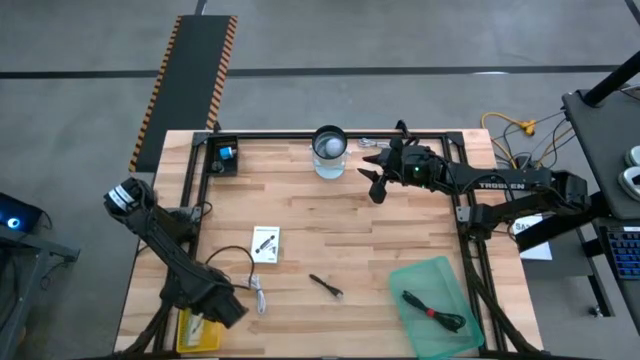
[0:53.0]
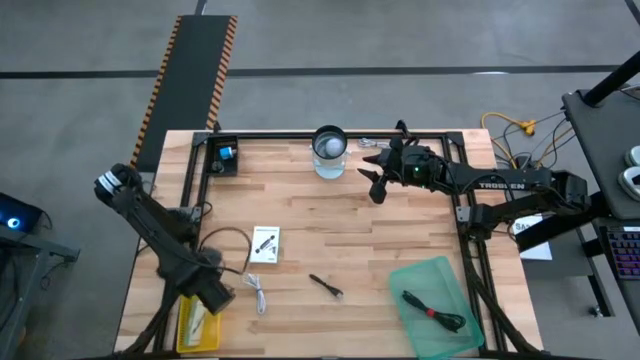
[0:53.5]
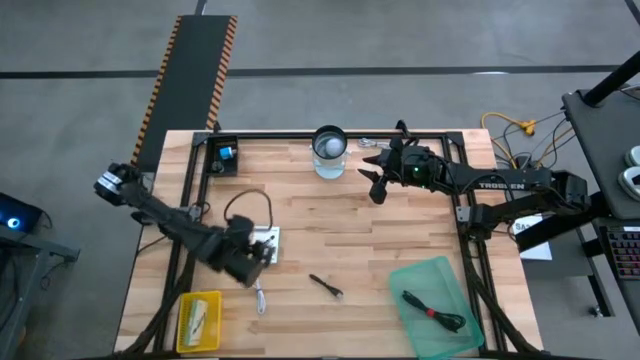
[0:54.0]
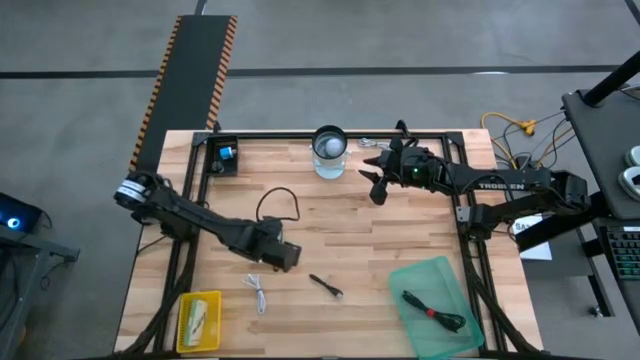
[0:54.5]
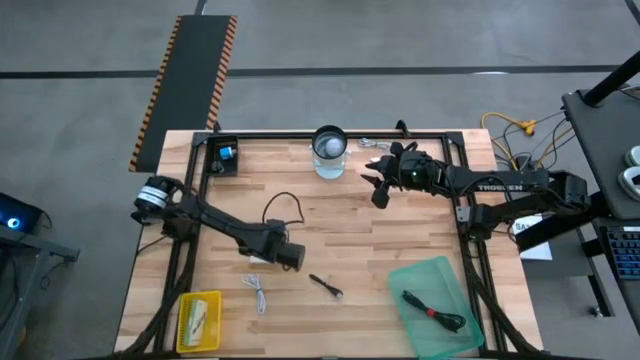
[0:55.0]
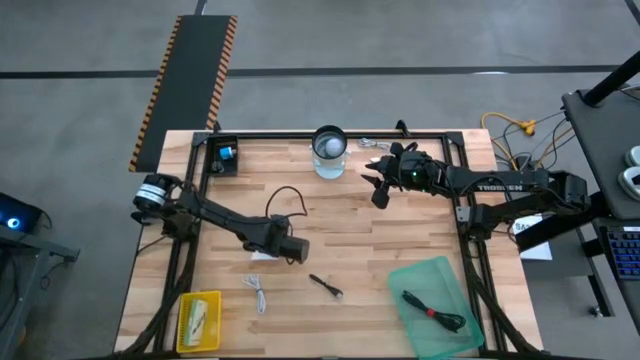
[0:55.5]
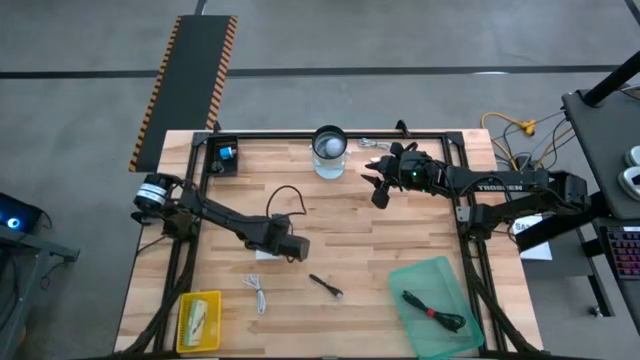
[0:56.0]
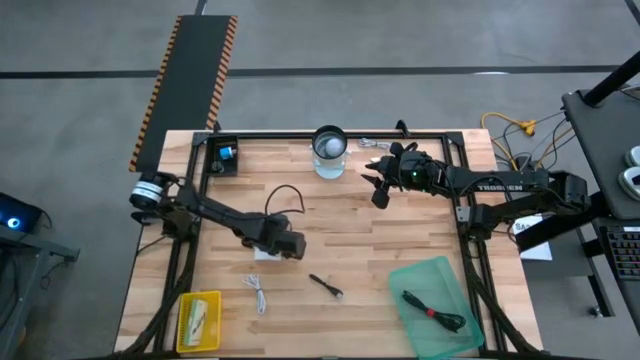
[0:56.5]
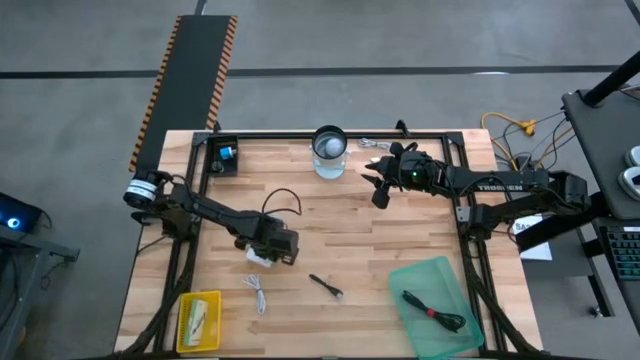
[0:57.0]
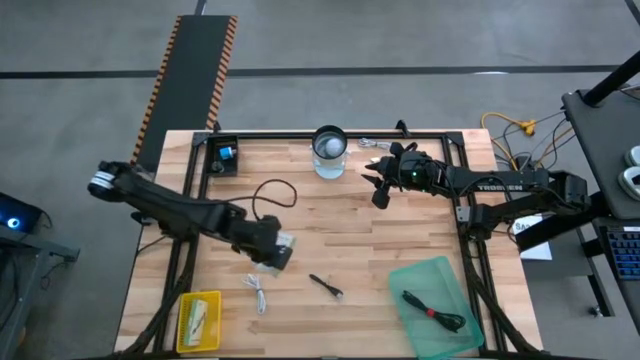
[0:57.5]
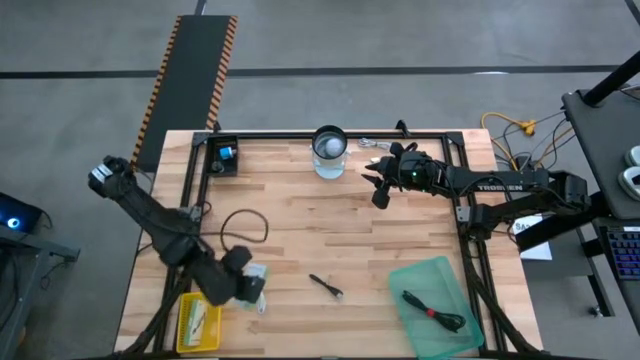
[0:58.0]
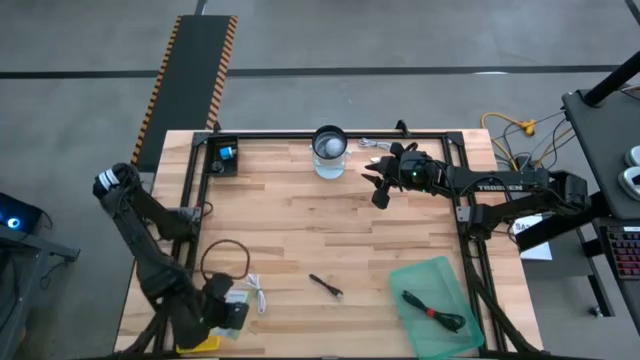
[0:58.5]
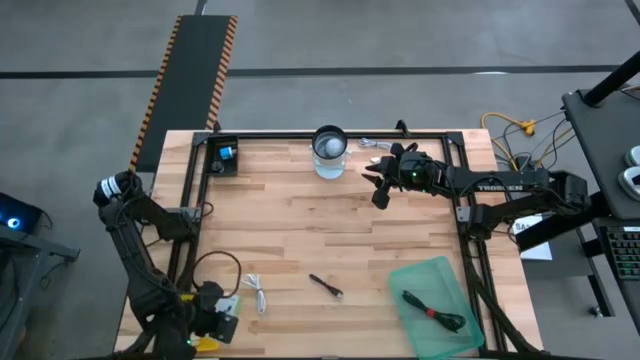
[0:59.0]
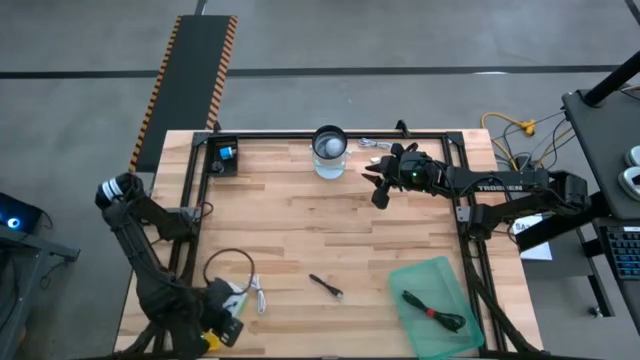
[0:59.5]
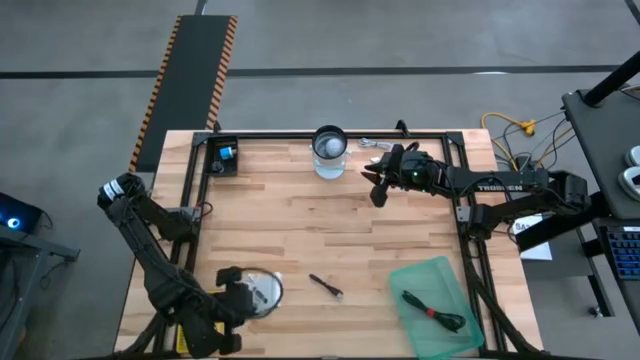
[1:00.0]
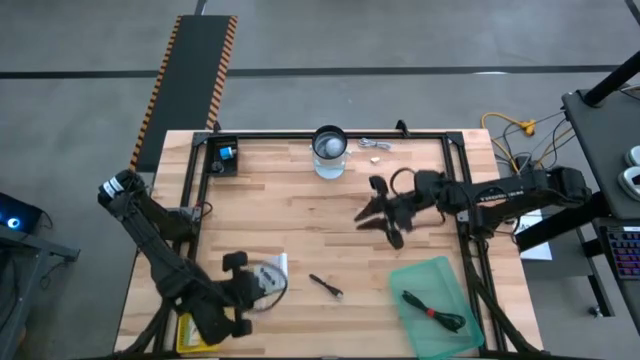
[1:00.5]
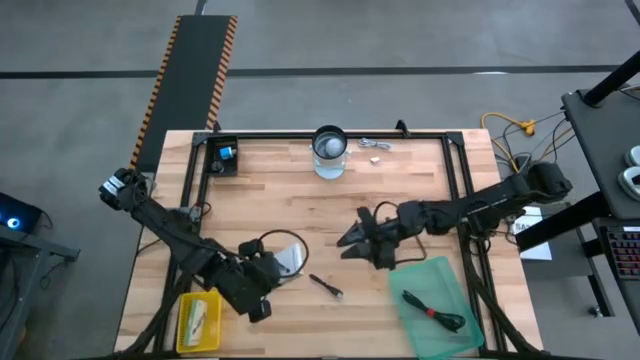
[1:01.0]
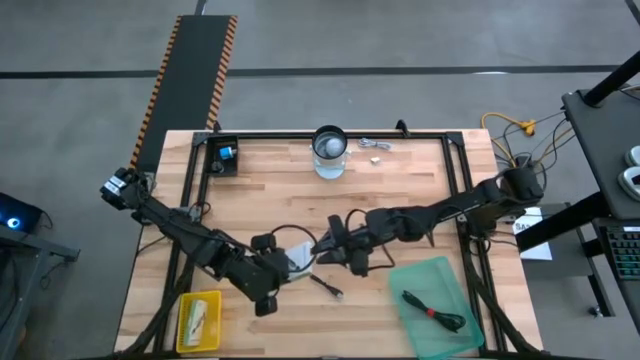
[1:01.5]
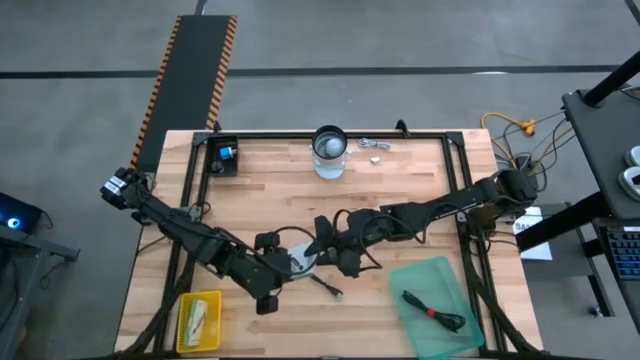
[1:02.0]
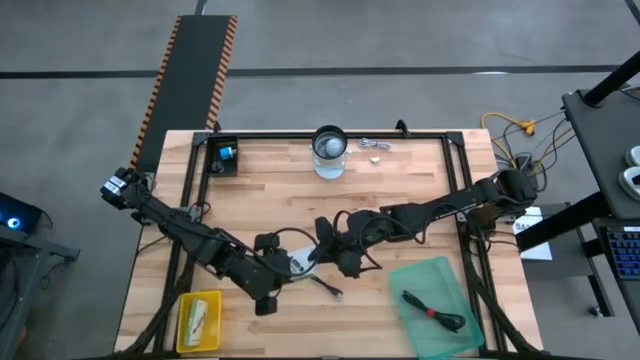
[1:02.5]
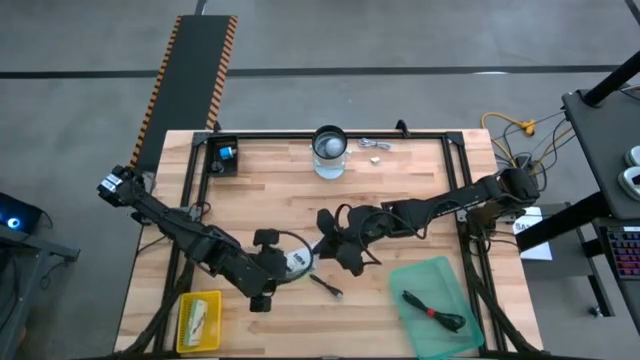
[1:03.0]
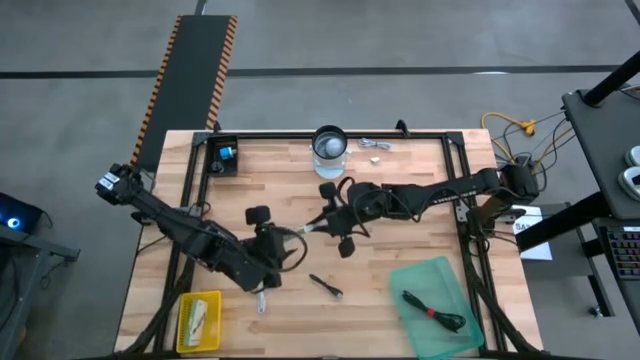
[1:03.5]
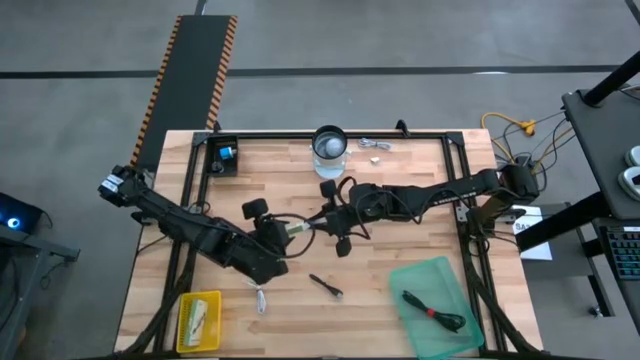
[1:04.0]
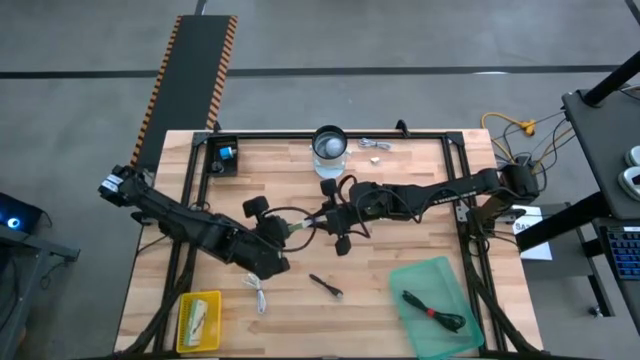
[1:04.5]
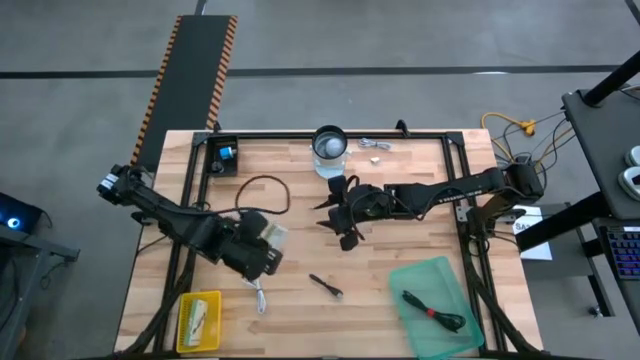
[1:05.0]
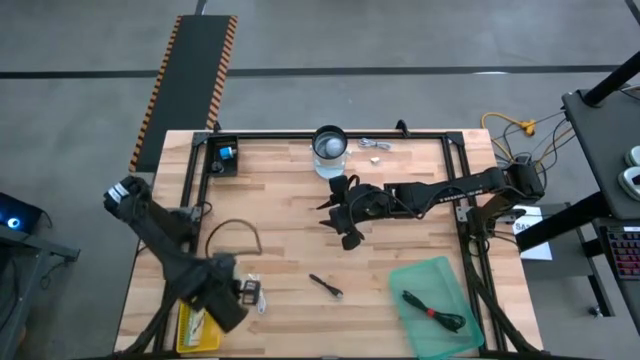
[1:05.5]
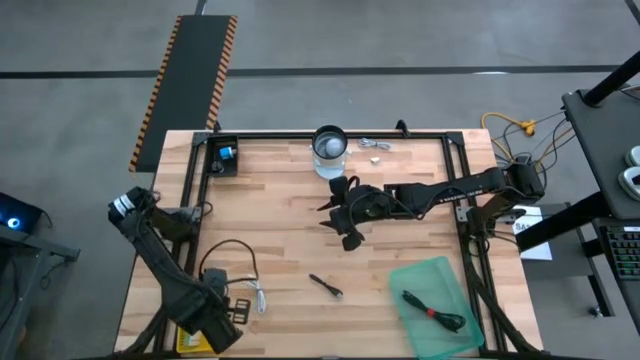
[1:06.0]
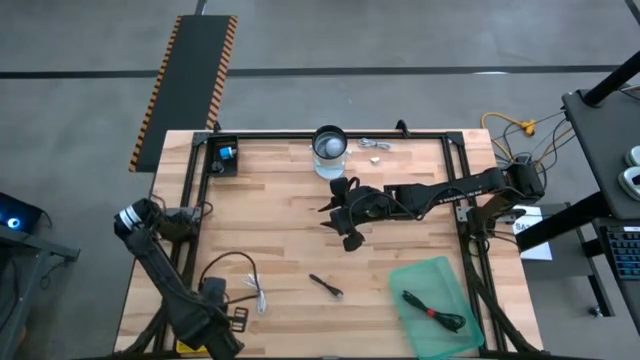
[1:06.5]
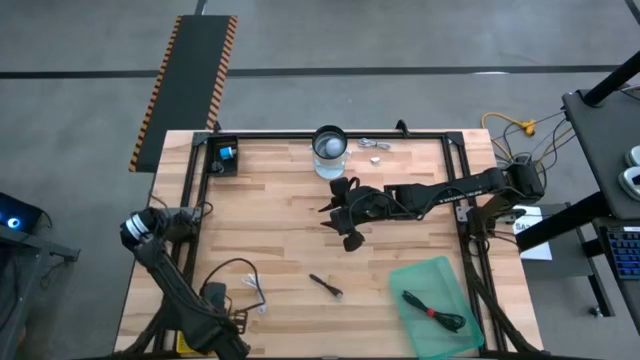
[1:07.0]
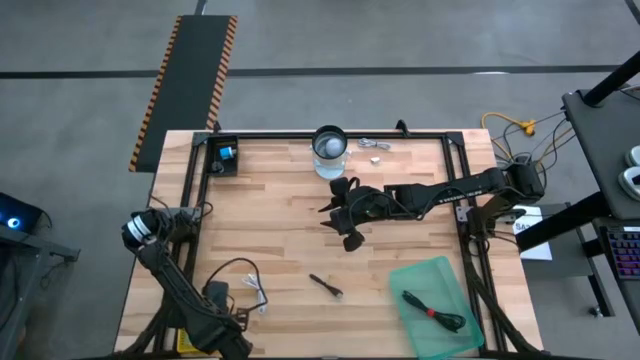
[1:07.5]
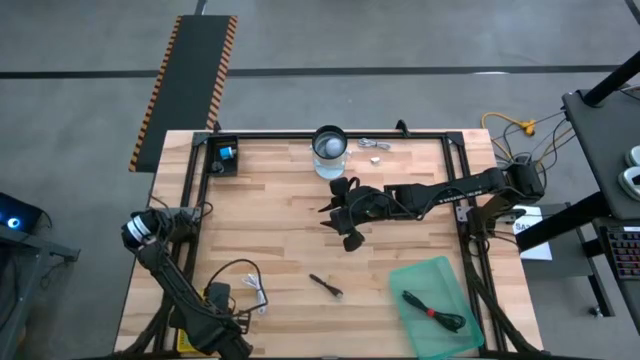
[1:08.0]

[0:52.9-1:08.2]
Task: Pick and place items into bin
Put the white card reader box into the yellow bin

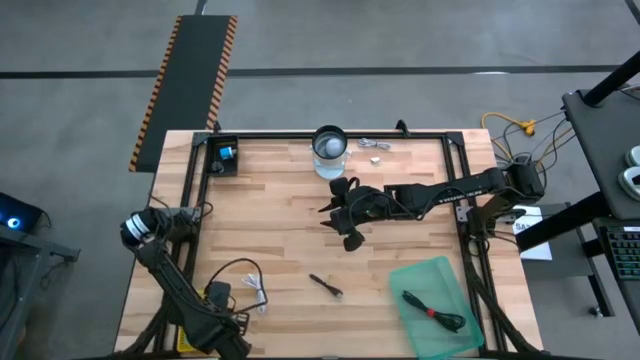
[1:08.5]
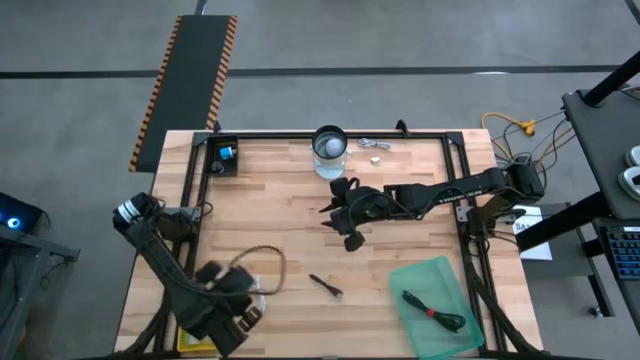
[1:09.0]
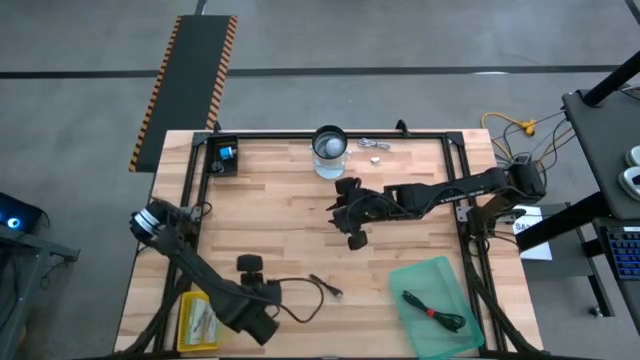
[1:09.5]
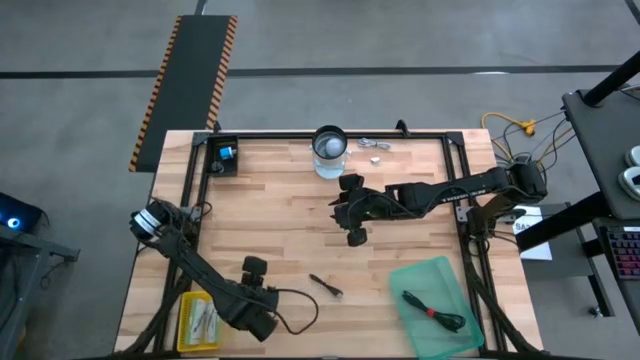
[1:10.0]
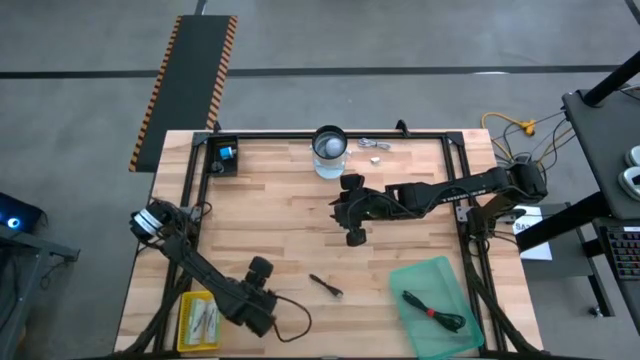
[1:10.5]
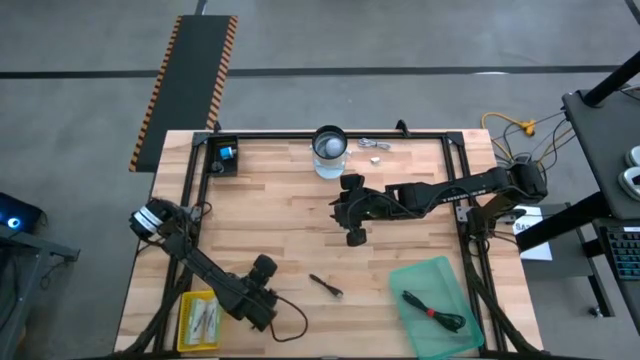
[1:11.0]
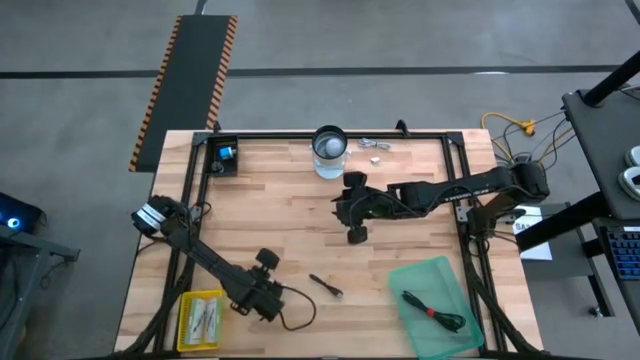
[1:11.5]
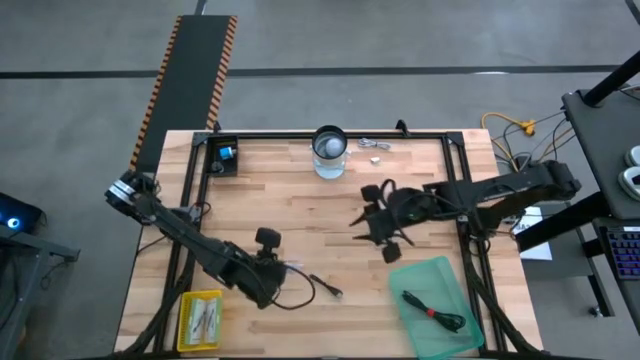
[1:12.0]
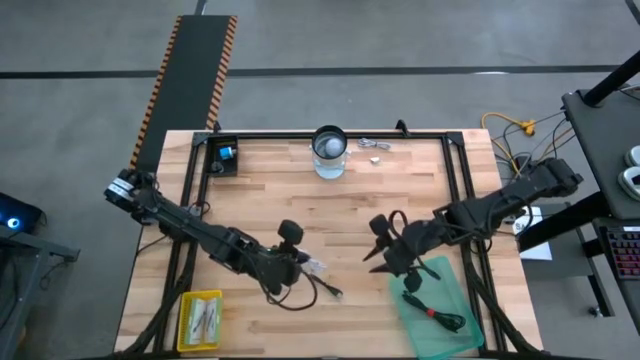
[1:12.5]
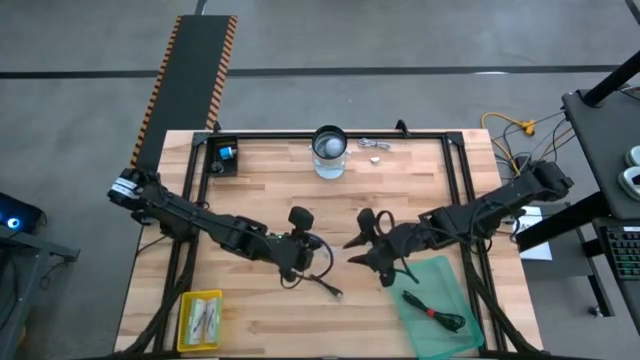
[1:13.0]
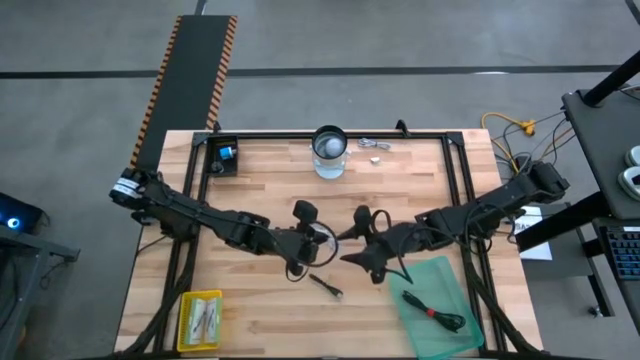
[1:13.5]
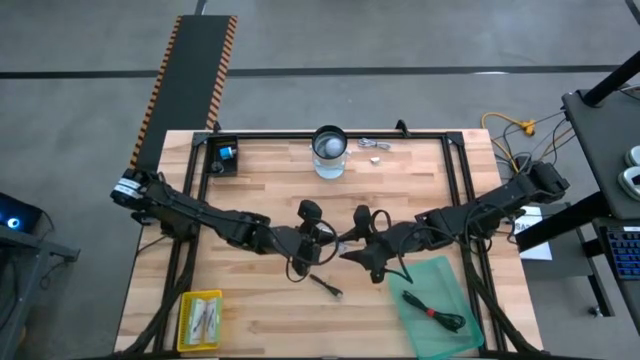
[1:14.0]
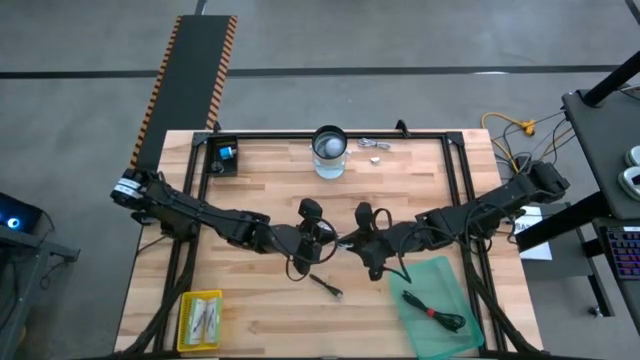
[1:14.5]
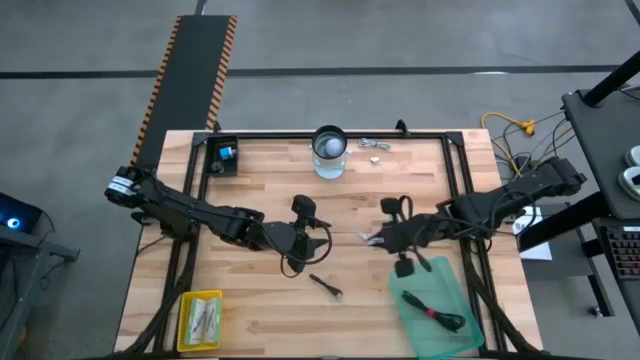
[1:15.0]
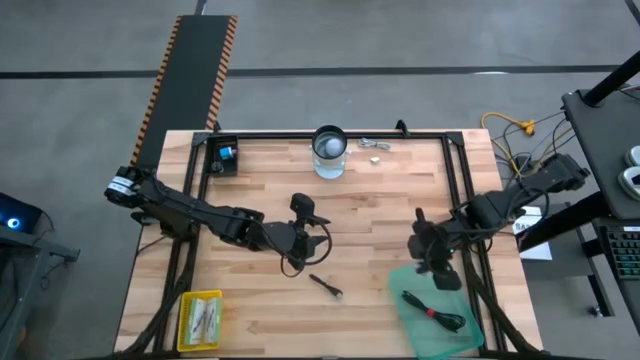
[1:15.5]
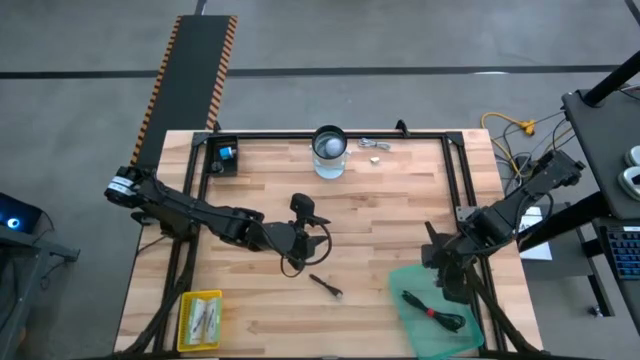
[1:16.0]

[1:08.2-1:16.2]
Put the bottom white usb cable into the green bin
